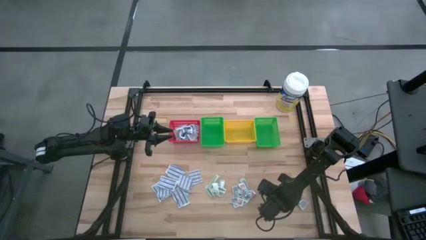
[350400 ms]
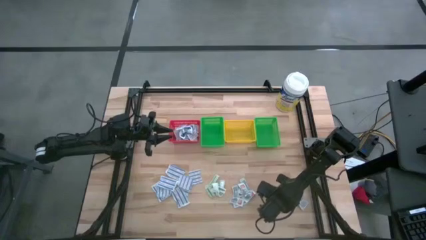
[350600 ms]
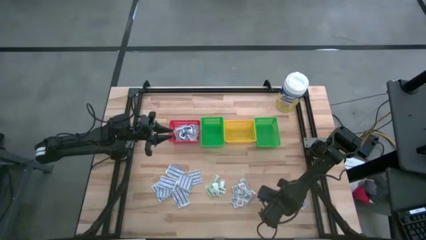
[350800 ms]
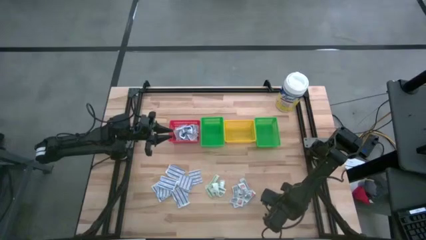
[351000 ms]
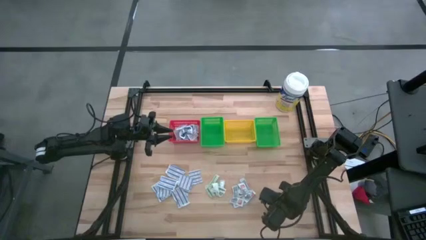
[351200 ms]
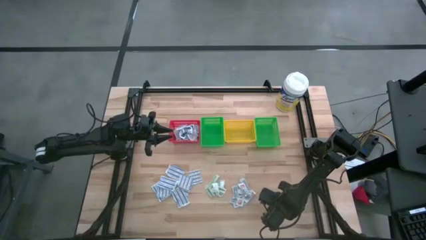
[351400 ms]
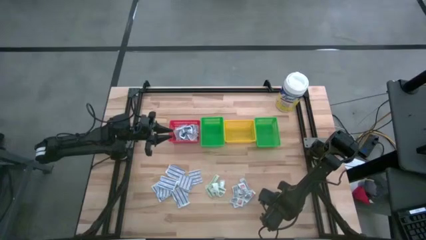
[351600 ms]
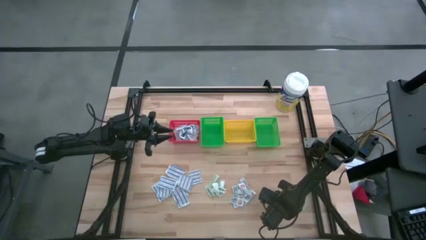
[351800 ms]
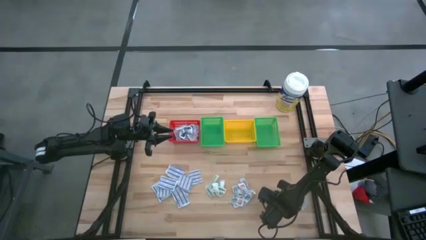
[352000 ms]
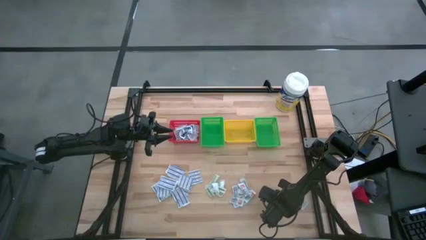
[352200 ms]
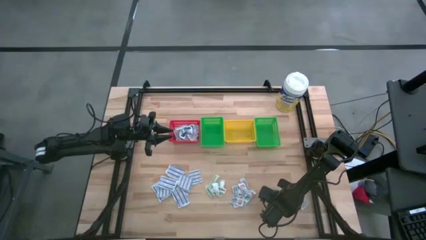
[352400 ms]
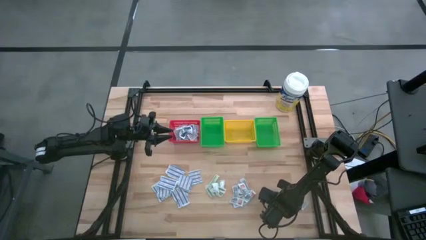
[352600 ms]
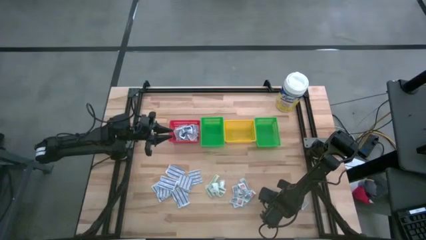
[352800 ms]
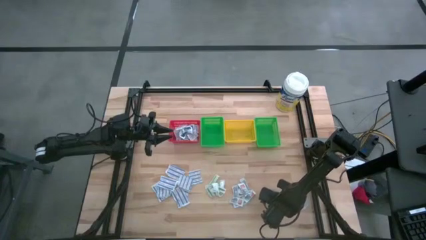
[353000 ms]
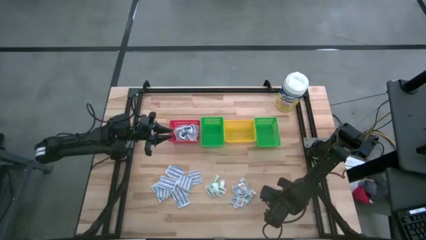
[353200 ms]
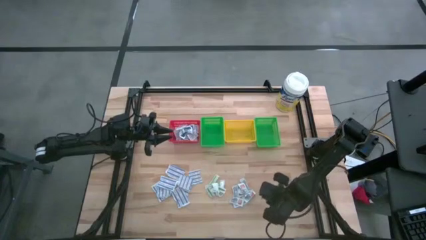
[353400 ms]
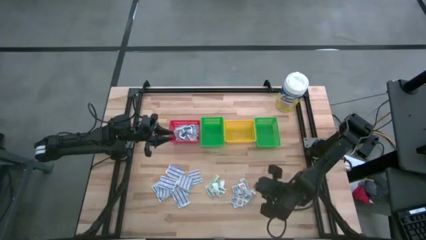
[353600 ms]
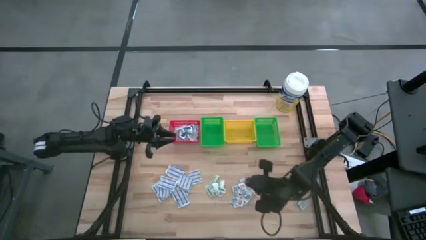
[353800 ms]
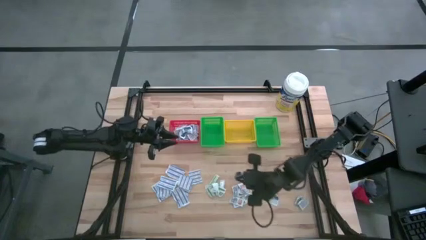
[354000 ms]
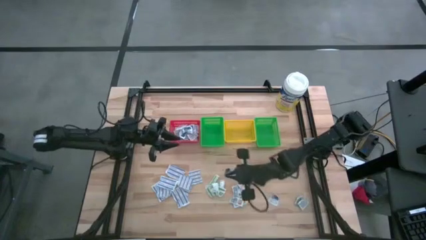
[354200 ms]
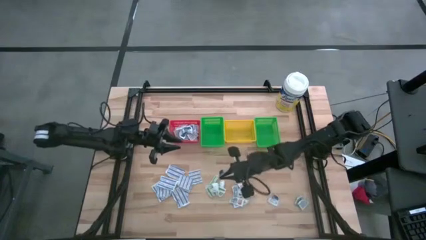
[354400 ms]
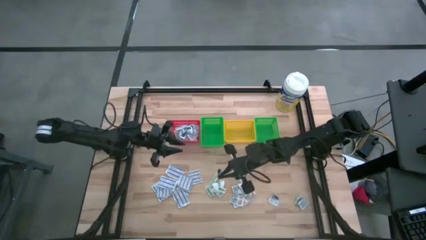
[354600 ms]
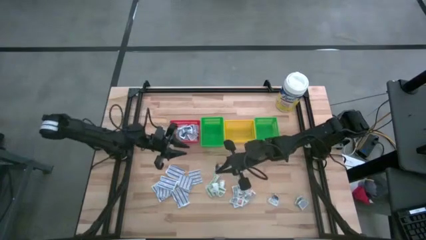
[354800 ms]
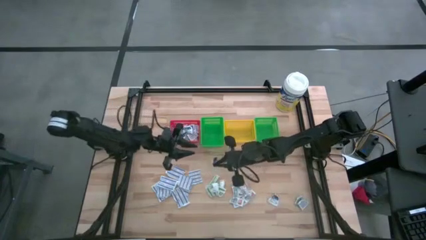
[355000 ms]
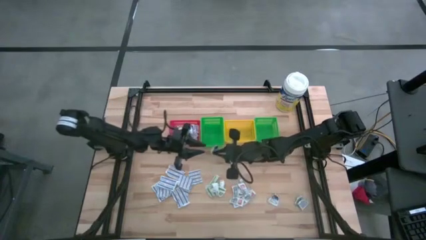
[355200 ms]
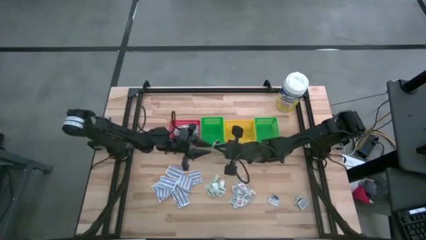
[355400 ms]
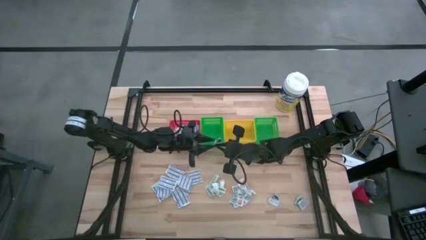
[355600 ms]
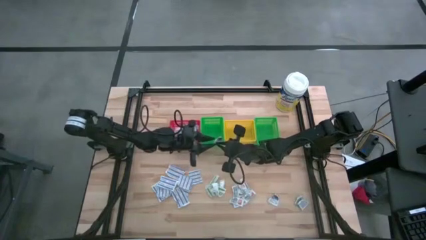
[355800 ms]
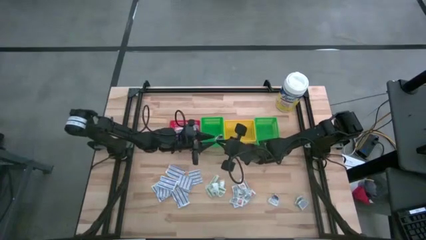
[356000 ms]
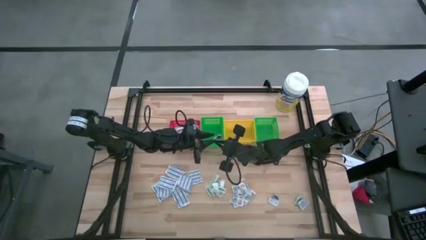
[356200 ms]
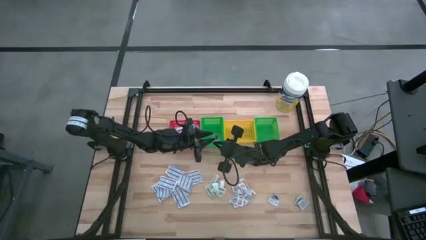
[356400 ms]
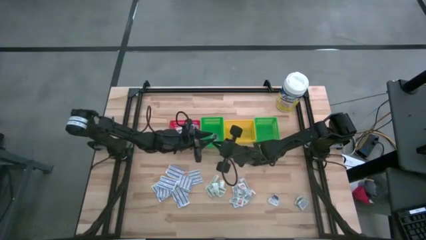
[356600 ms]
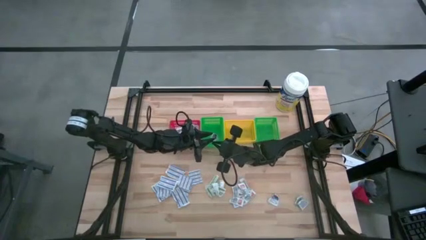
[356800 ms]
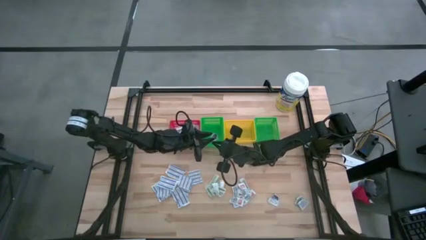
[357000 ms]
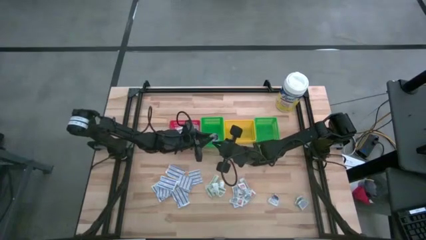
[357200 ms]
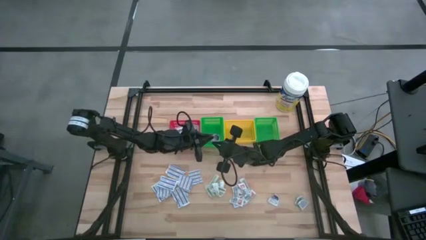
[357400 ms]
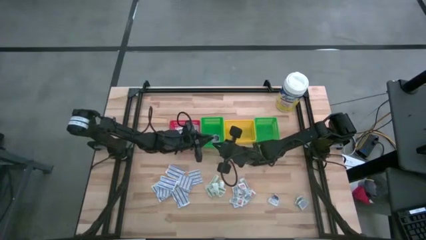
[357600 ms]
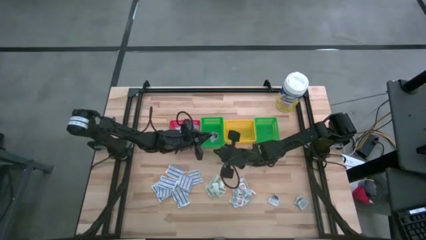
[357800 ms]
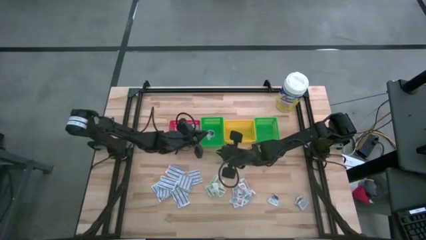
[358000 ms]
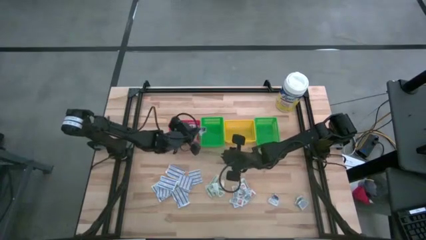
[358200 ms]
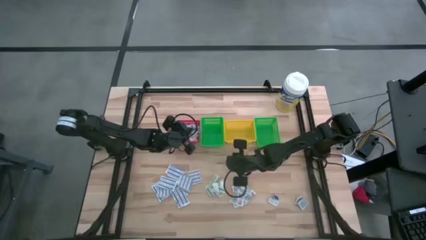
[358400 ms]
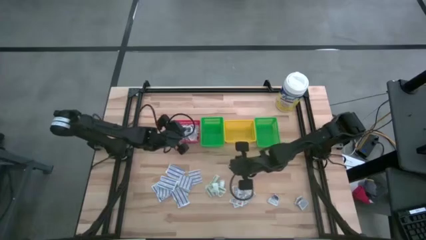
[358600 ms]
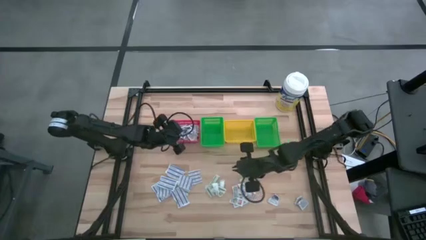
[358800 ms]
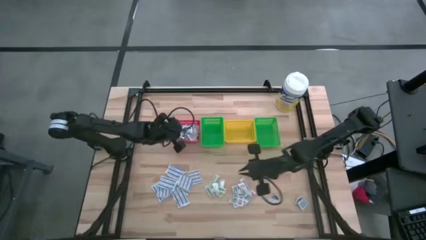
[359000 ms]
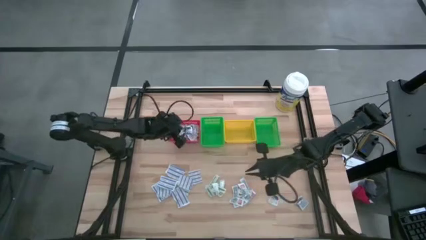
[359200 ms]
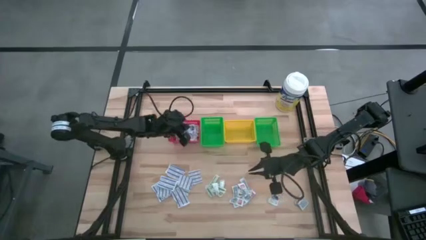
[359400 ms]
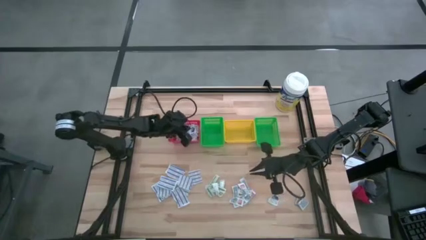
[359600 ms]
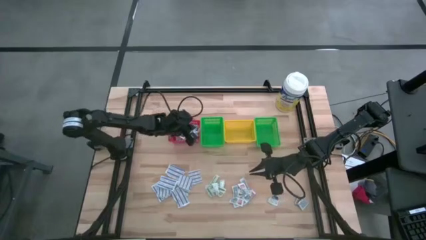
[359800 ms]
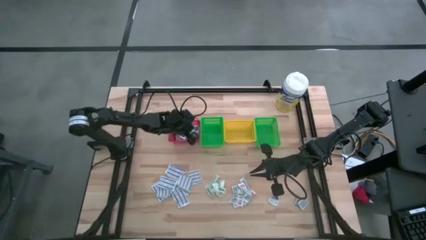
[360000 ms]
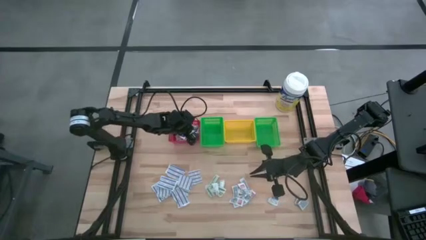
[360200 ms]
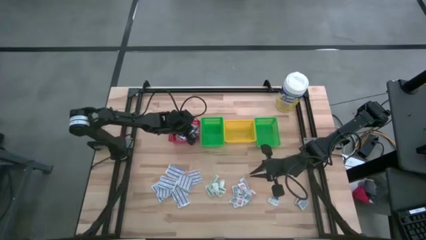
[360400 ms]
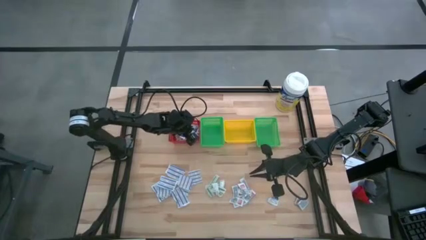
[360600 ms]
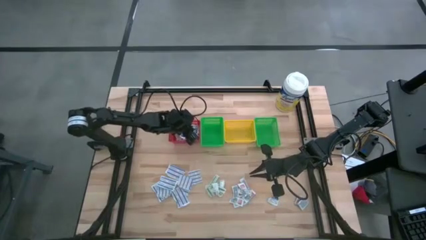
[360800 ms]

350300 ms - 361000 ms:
Task: Pick & Place First Aid Supplies
Put the alcohol pad into the red basket

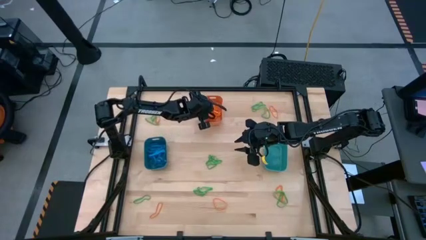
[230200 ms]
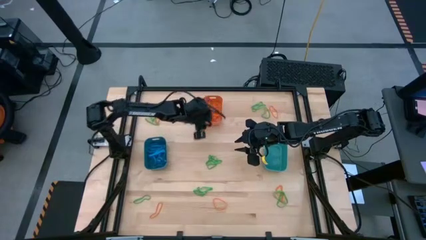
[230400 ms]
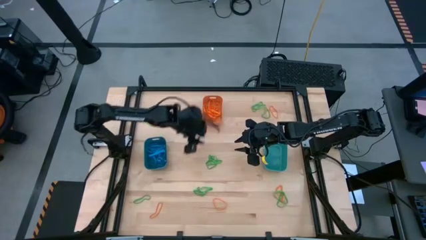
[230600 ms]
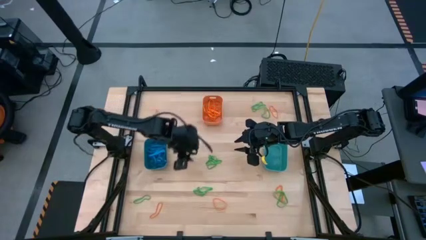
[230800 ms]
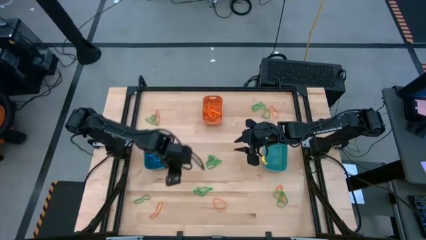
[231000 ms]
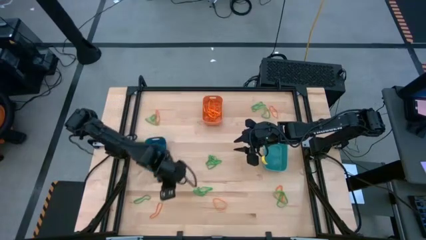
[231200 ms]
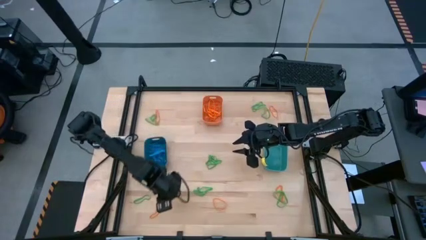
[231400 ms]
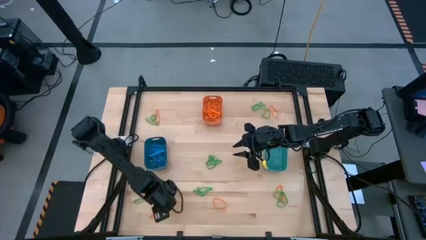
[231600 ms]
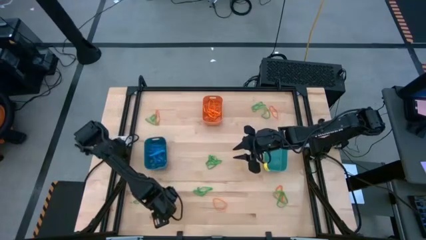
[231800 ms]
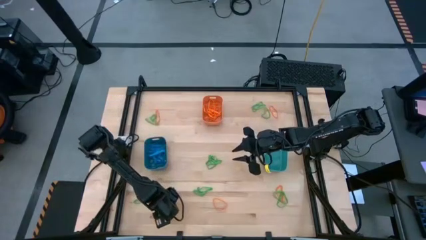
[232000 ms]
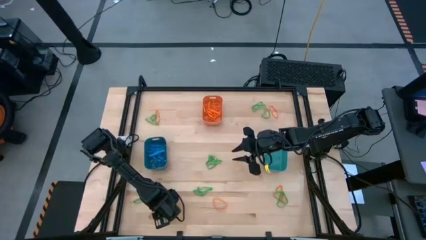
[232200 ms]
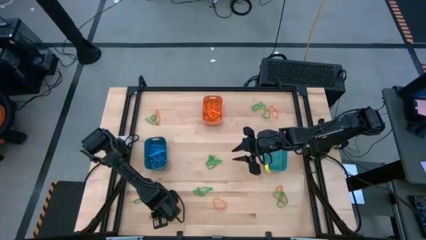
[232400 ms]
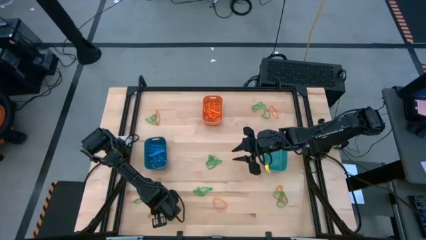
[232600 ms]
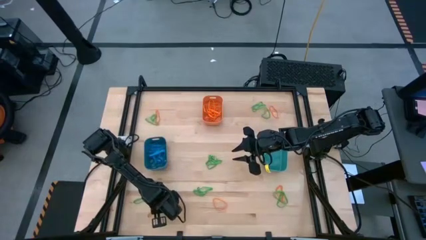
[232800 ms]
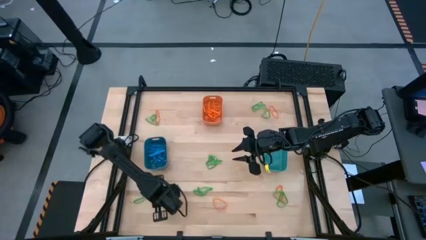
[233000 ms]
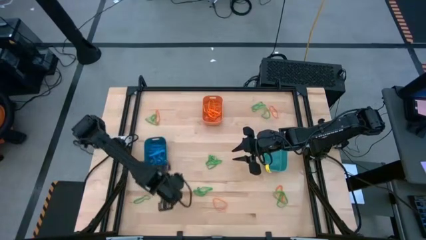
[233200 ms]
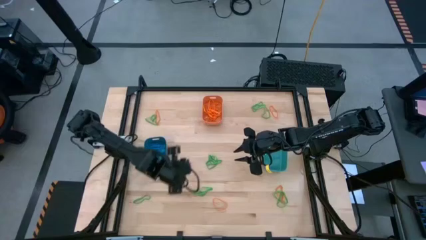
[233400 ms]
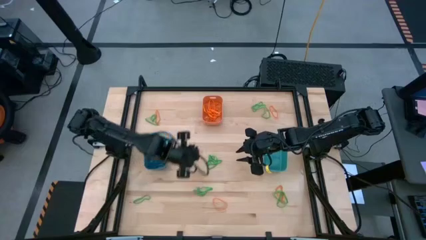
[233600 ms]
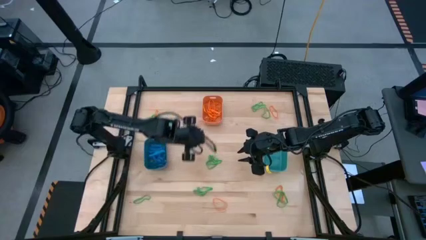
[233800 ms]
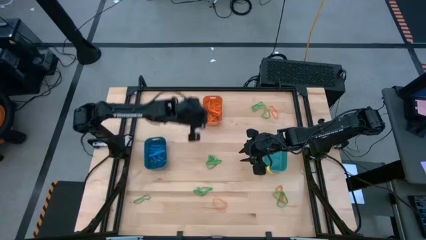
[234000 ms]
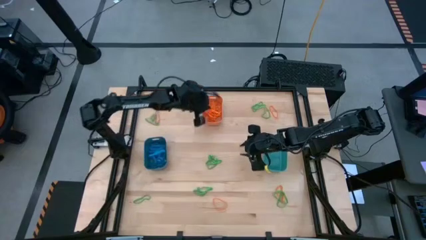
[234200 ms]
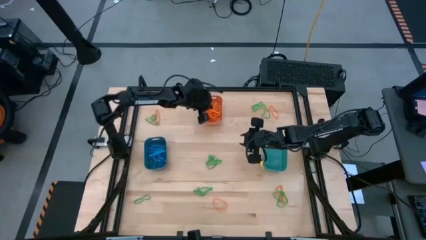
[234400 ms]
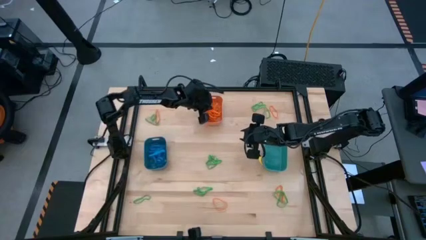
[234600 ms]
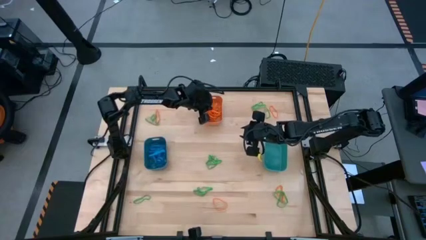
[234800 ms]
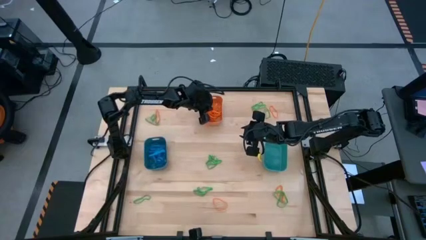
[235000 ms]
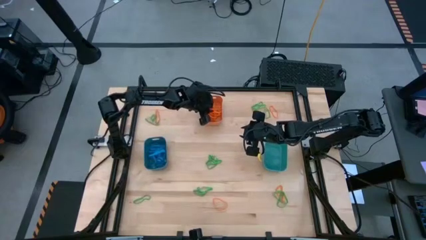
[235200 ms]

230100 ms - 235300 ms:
Task: Sort rubber bands into baskets
Put the orange rubber band into the orange bin
